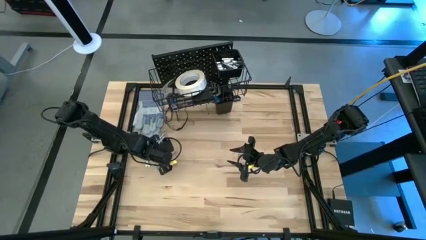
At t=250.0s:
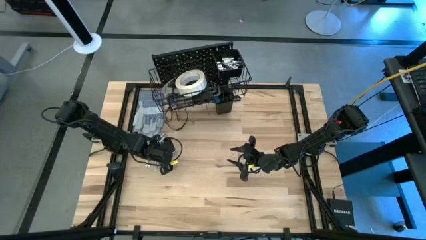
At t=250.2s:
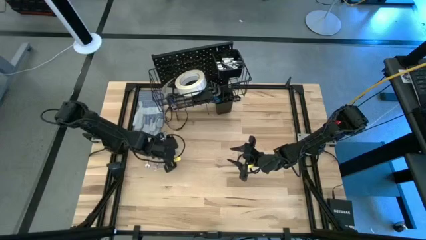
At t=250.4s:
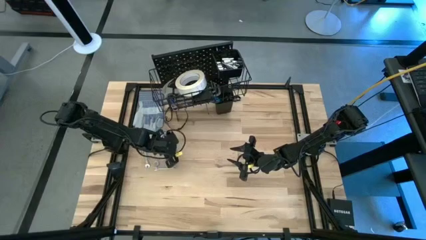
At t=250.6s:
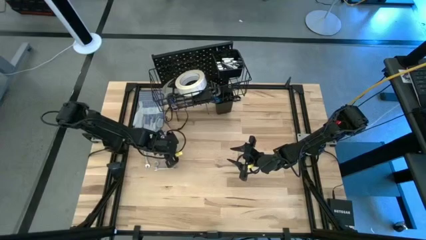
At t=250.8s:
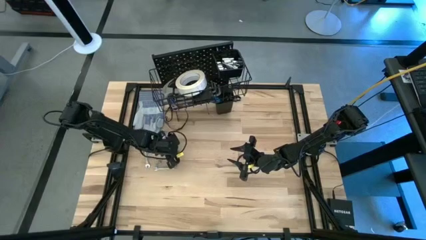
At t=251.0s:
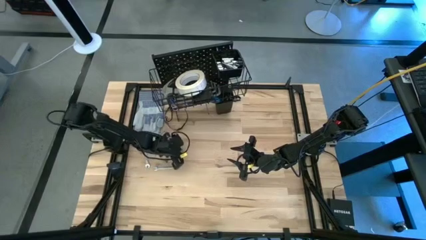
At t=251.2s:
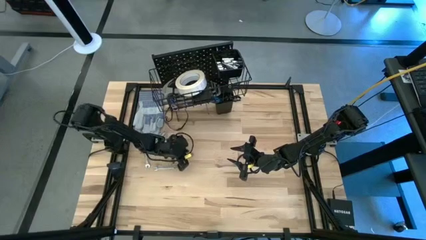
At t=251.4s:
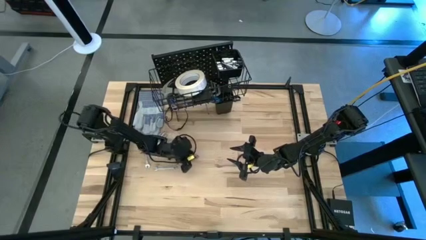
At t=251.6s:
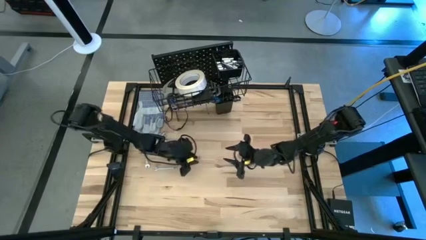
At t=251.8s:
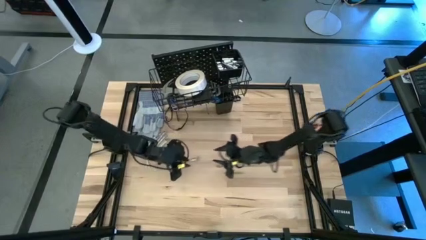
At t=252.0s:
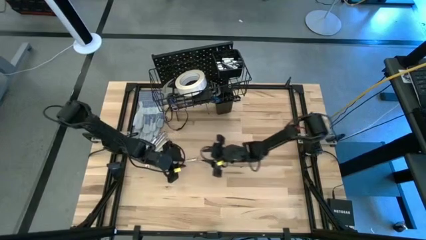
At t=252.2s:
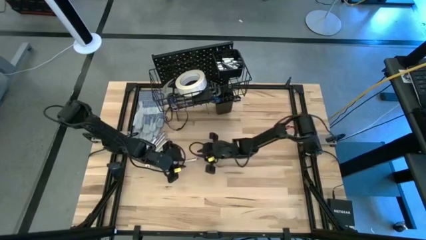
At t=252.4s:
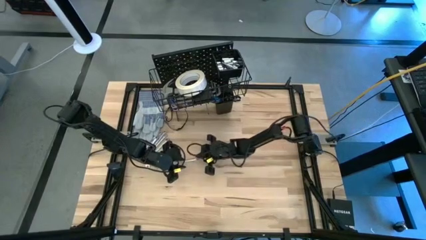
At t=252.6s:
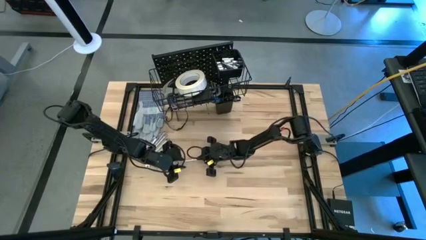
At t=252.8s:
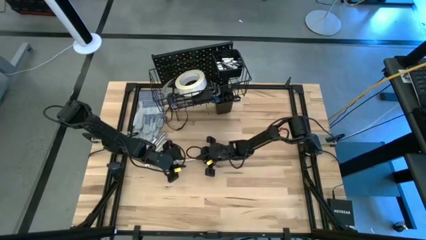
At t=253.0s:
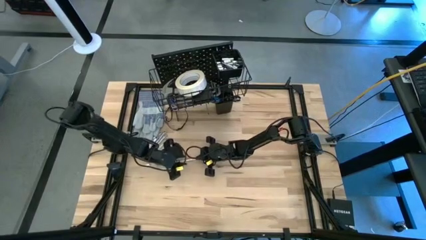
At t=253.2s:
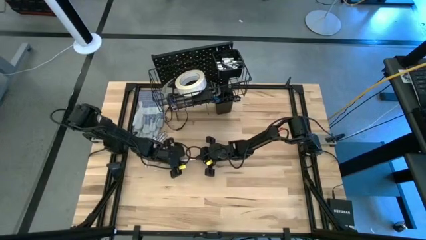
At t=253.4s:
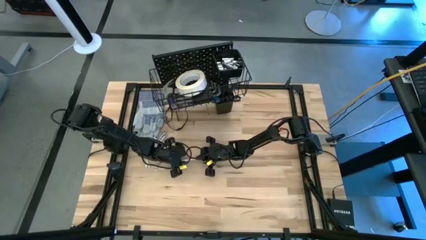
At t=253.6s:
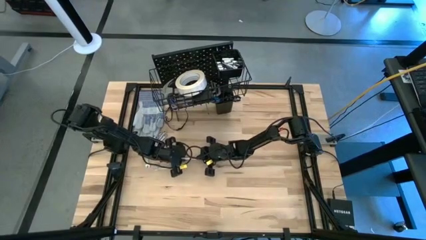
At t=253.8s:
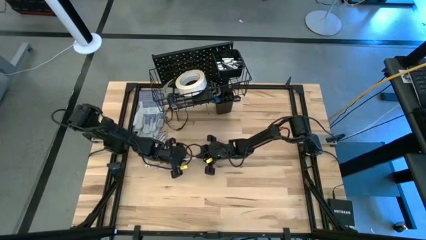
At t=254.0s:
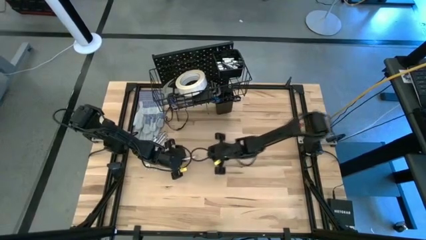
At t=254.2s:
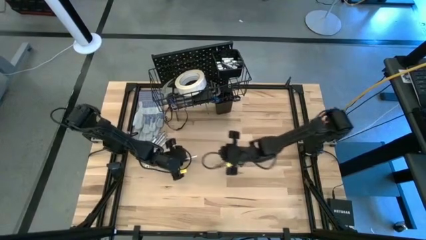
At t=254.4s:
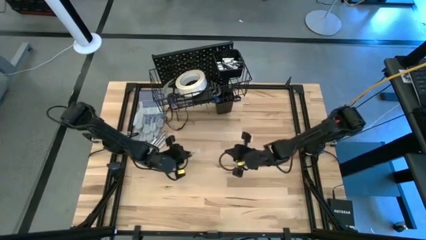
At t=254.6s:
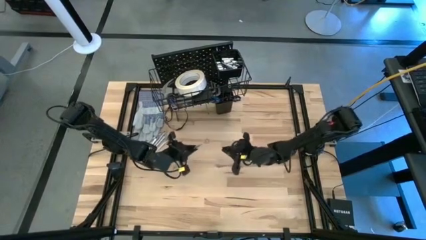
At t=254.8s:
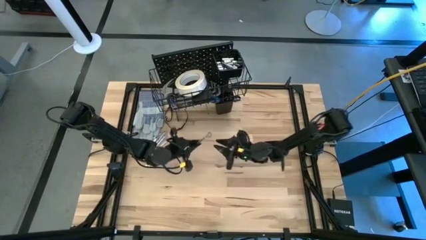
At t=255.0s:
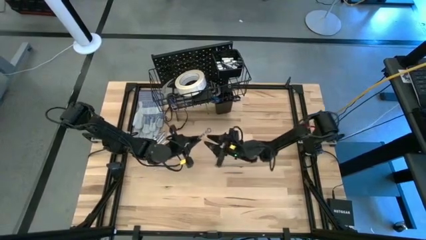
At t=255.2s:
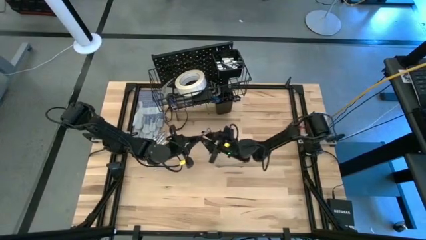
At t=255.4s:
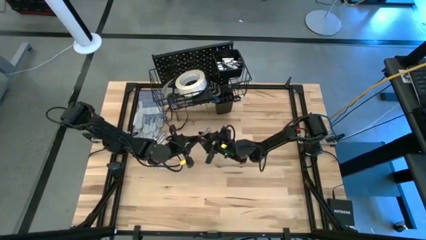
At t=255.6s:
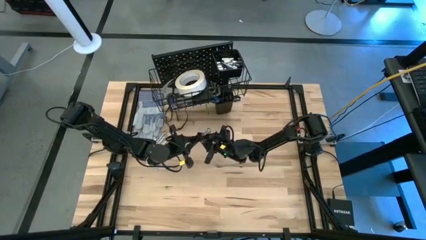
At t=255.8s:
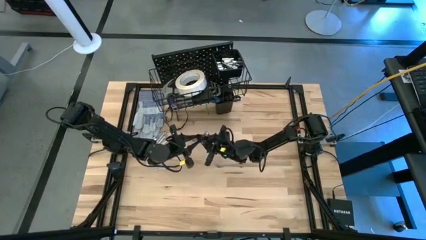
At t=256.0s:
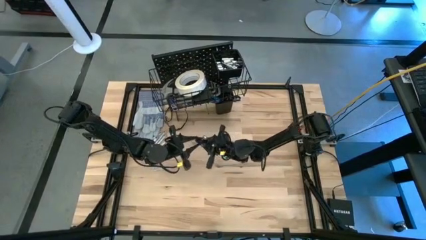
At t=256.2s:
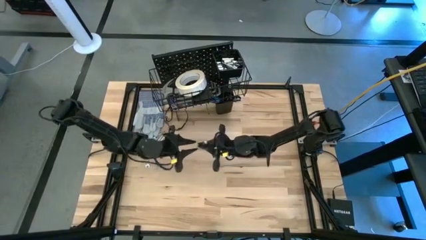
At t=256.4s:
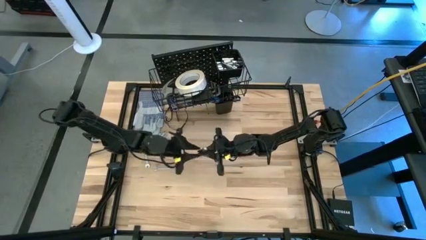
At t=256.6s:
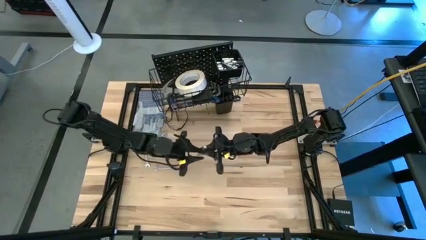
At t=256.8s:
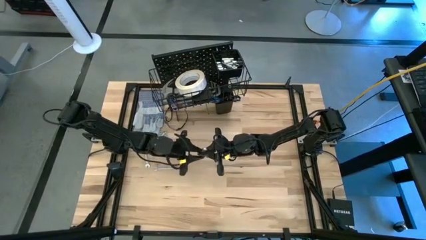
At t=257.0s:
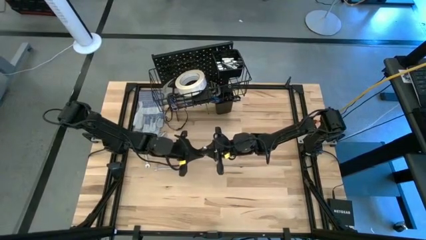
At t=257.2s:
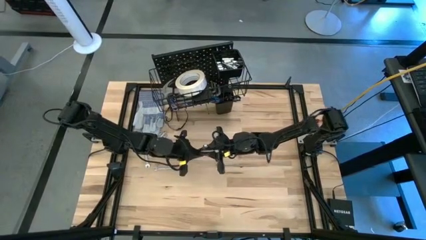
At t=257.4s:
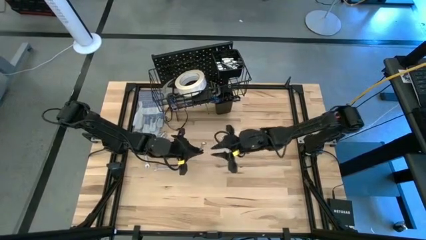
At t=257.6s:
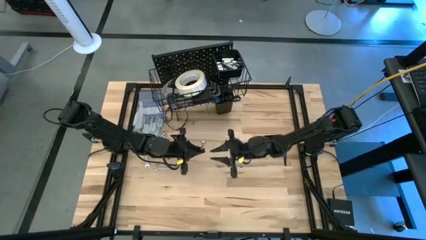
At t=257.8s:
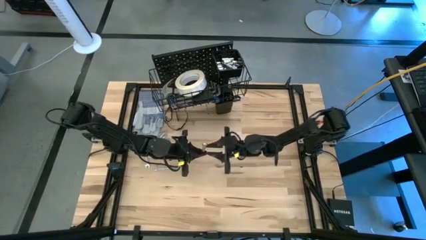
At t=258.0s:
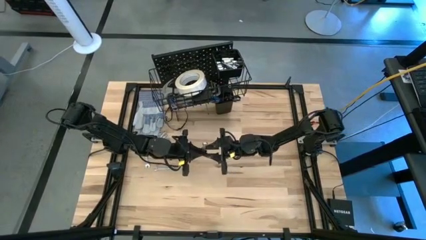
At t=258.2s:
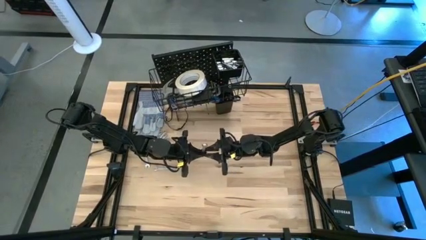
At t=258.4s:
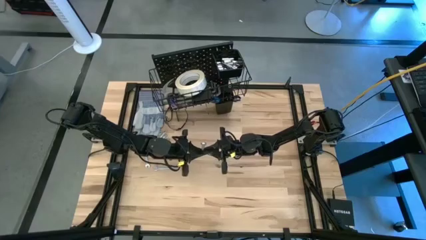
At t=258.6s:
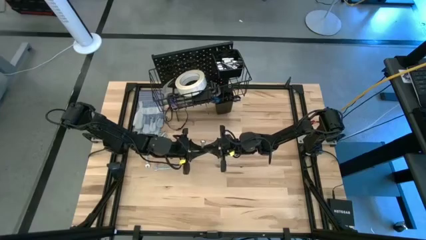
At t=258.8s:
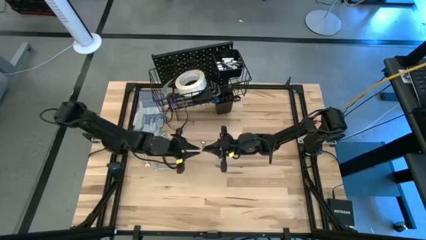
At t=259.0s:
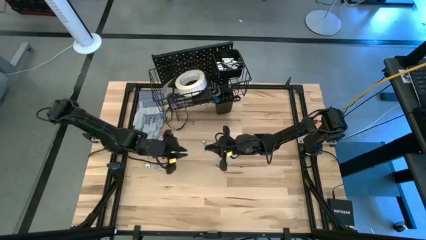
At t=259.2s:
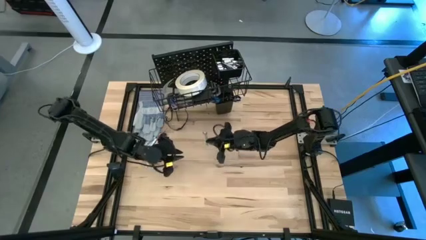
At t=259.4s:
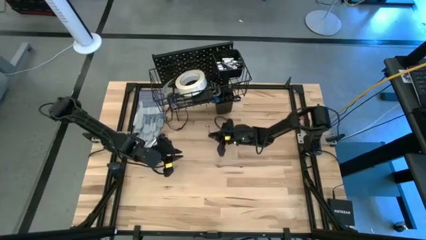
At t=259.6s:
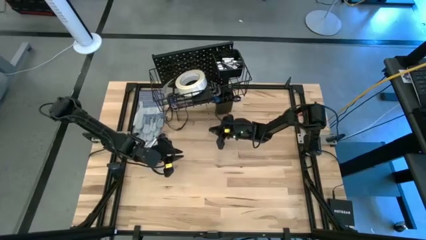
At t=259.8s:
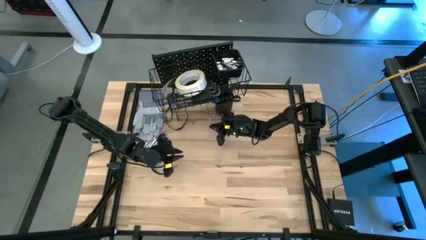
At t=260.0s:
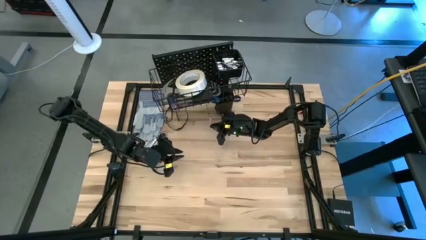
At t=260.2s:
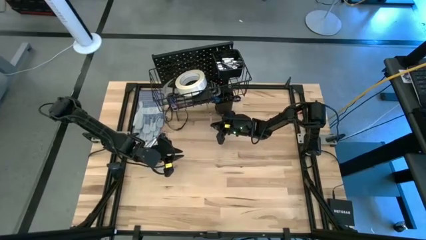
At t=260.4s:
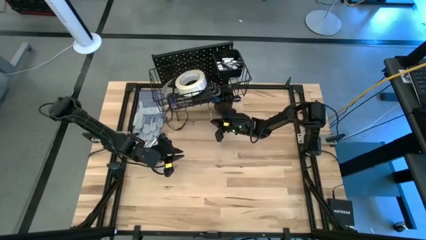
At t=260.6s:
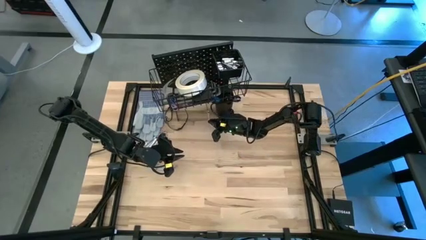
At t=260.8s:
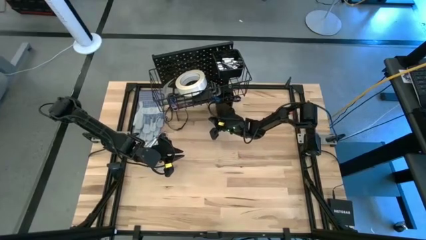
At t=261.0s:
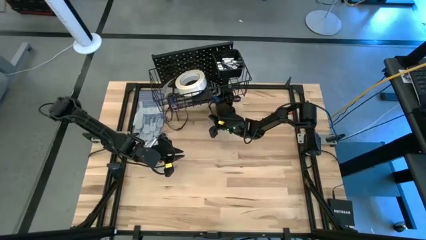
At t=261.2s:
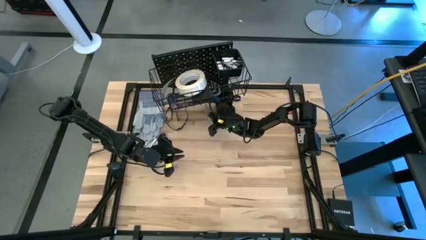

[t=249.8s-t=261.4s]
Task: Hang tools onto peg board
Hang the wrench on the pegboard

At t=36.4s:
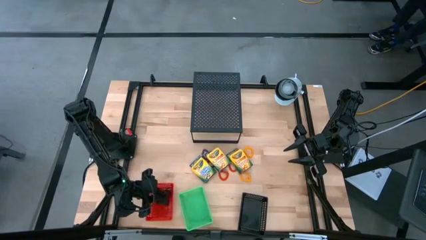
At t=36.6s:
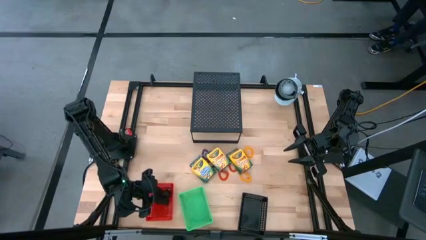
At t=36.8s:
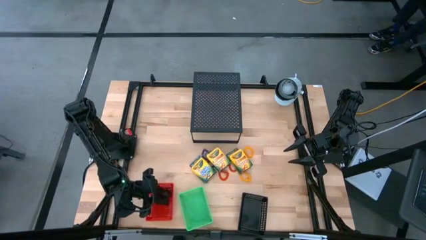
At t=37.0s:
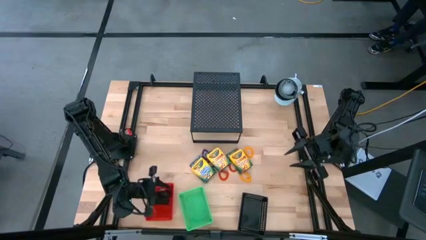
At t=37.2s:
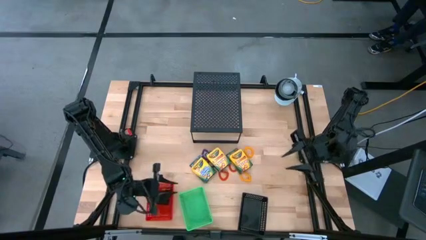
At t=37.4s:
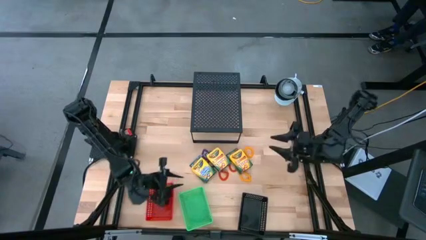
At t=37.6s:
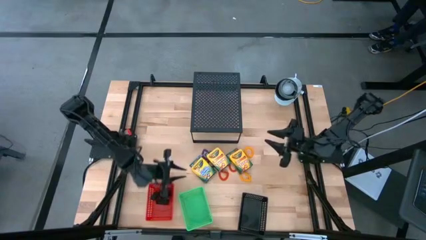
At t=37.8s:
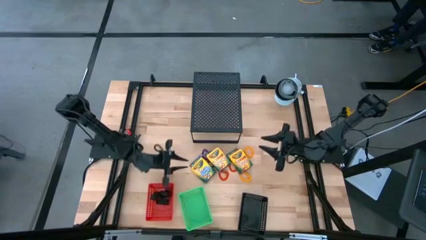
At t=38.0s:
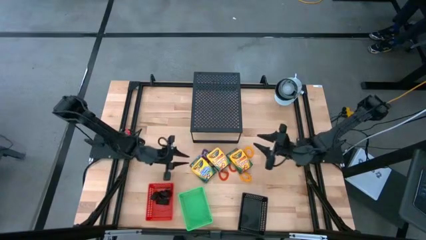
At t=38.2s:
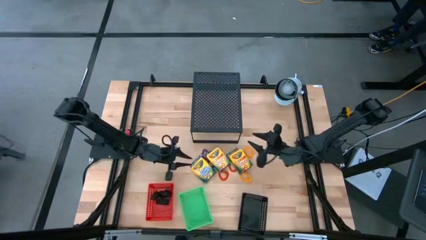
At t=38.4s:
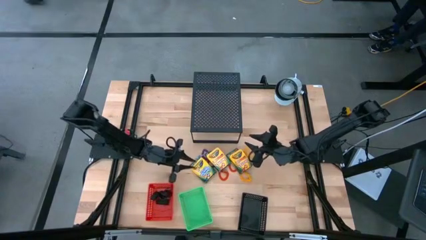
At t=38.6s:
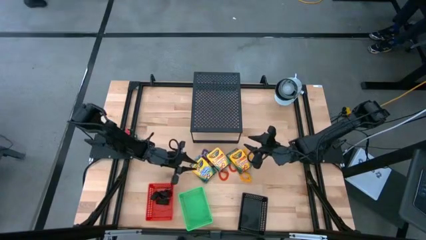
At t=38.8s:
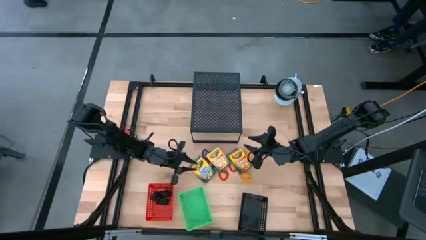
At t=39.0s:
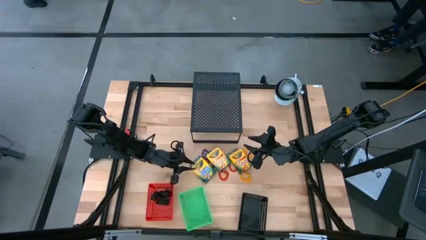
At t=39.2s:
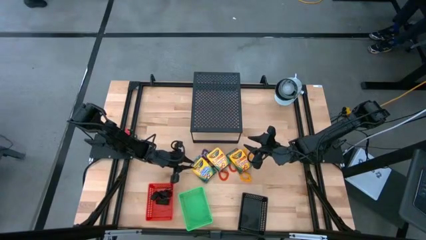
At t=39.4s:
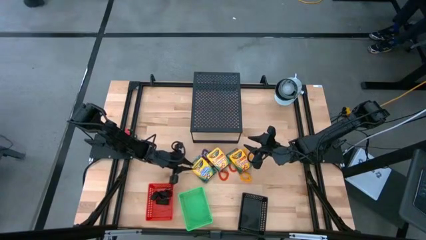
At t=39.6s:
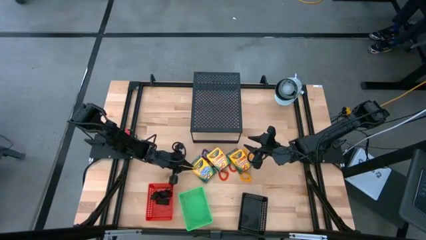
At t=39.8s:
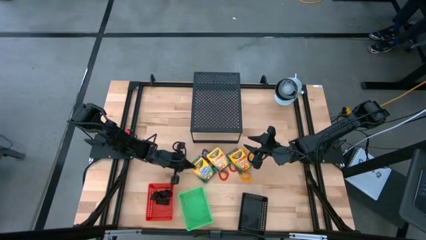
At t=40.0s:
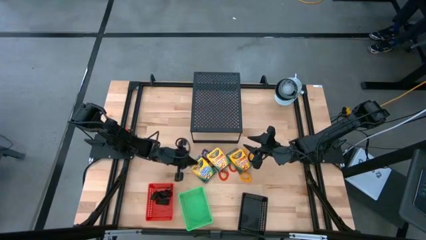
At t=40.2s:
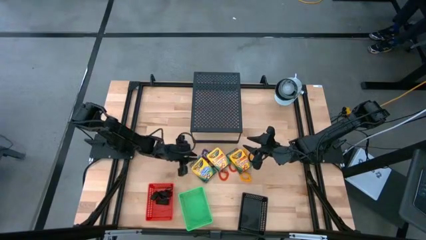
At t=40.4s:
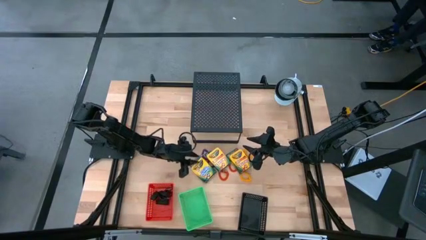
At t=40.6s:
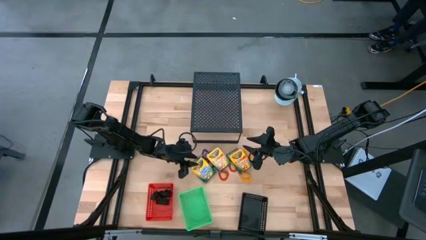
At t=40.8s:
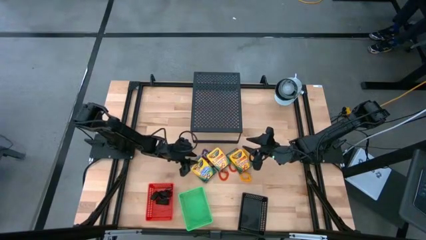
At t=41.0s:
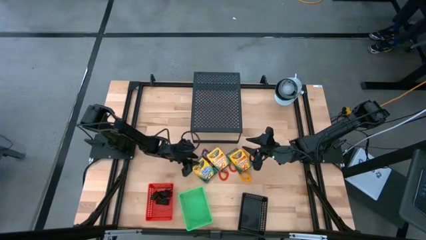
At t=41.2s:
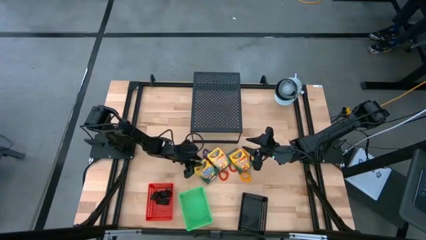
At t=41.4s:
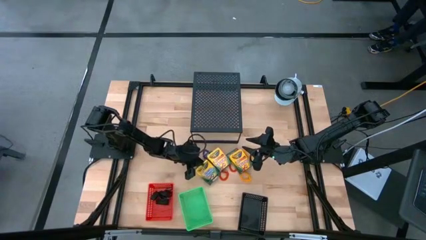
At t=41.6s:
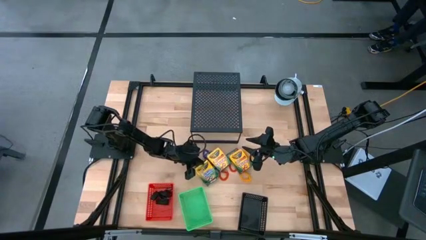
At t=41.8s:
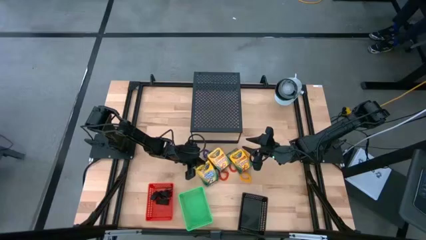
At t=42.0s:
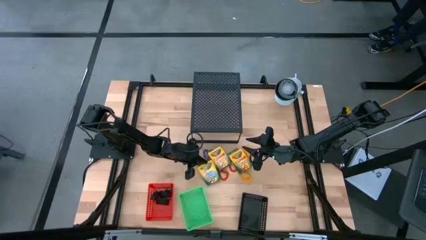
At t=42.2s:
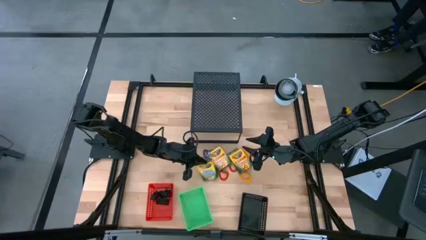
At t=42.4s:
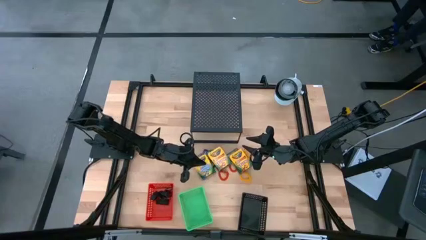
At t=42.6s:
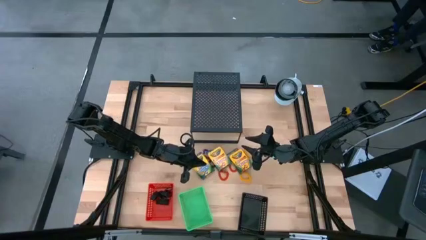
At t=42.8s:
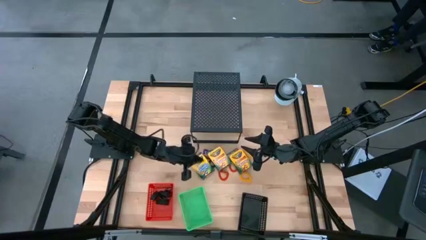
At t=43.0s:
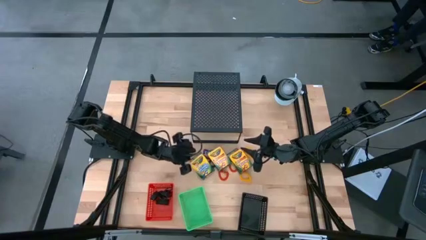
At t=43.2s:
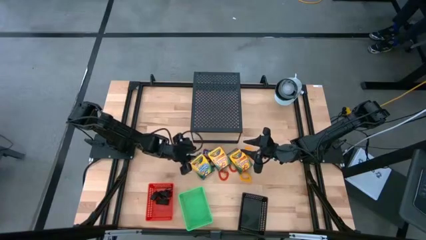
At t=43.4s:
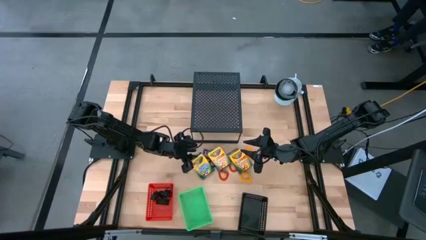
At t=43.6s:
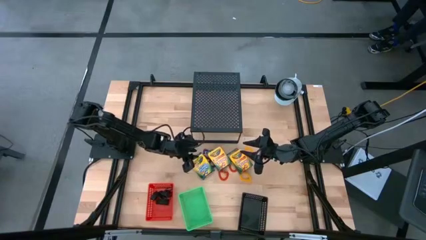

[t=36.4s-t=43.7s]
Task: Pick & Place Office Desk Supplies
Put the crayon box into the green bin
